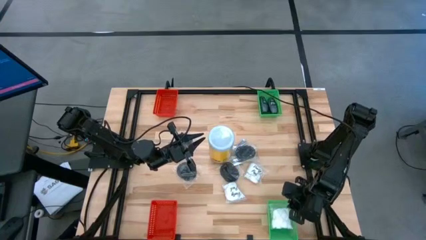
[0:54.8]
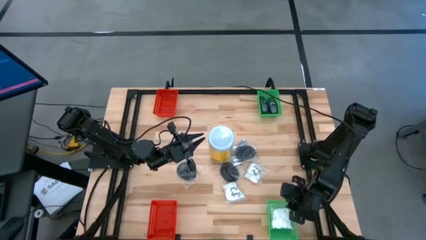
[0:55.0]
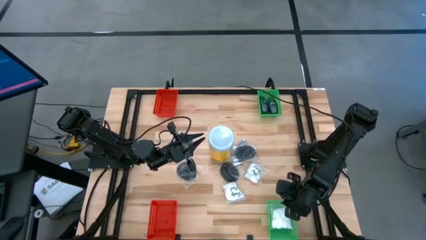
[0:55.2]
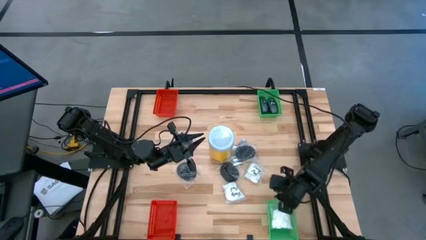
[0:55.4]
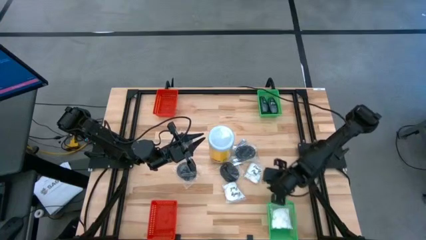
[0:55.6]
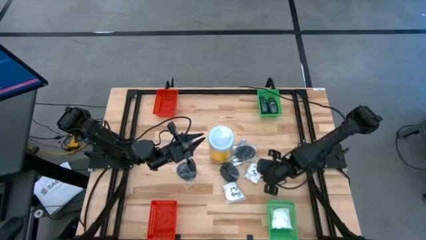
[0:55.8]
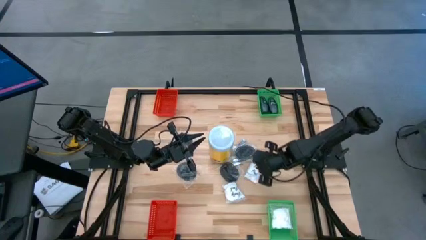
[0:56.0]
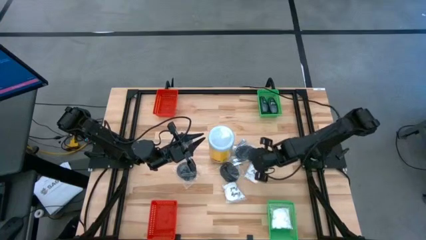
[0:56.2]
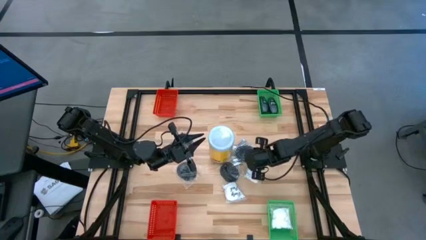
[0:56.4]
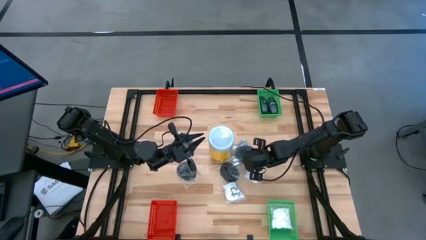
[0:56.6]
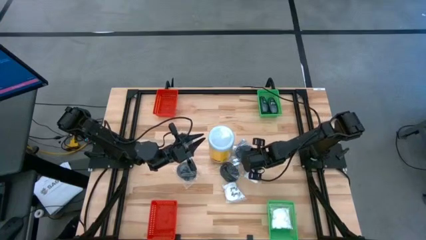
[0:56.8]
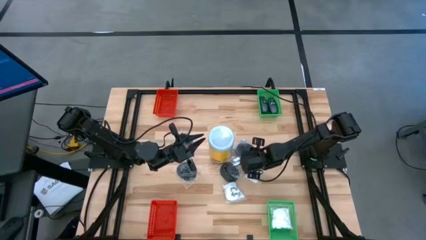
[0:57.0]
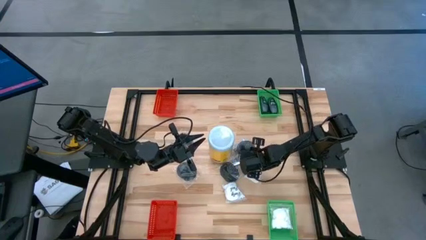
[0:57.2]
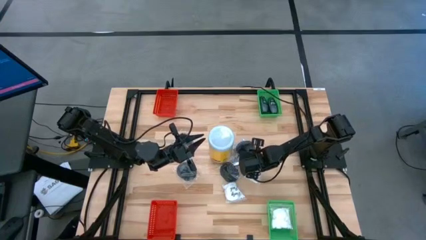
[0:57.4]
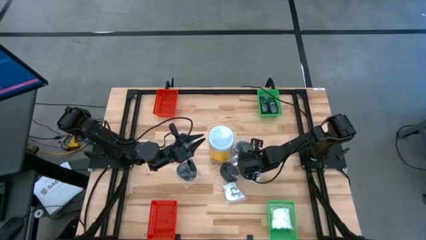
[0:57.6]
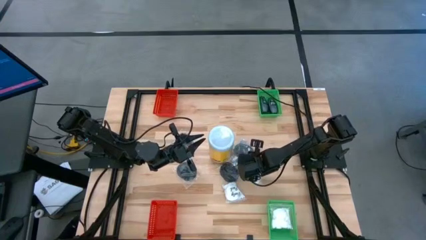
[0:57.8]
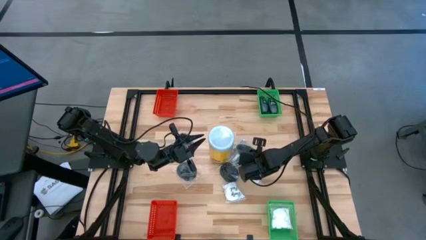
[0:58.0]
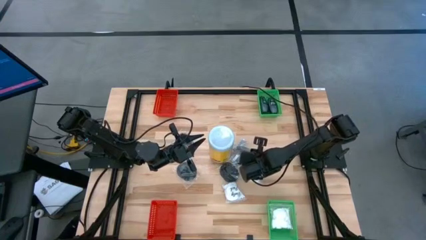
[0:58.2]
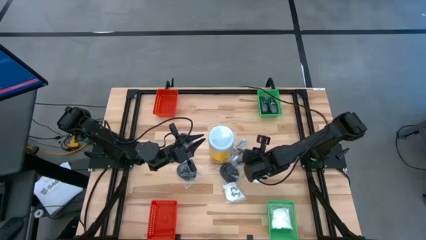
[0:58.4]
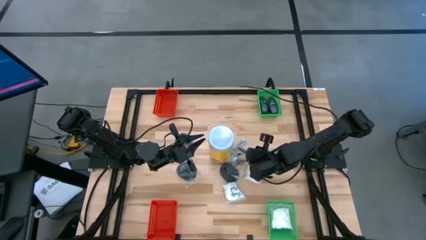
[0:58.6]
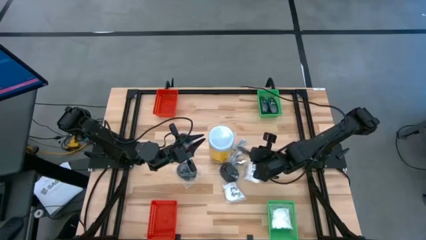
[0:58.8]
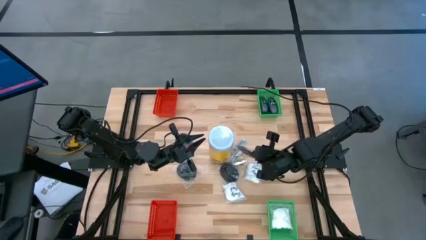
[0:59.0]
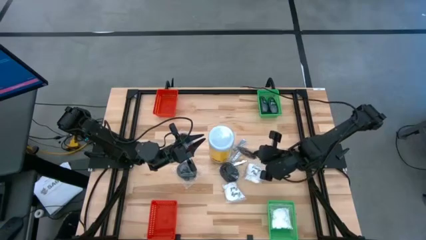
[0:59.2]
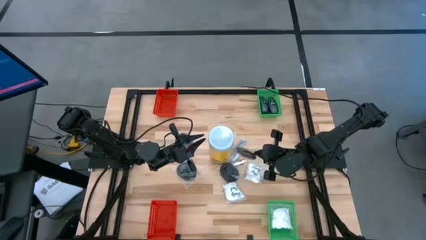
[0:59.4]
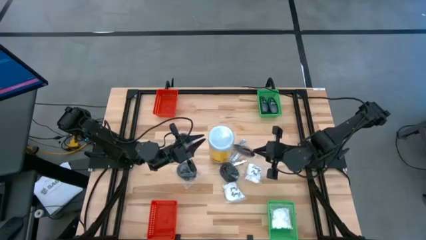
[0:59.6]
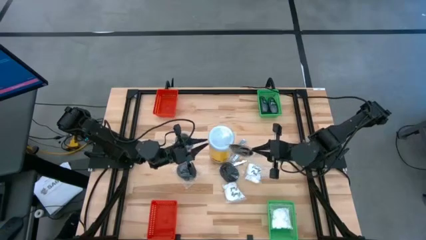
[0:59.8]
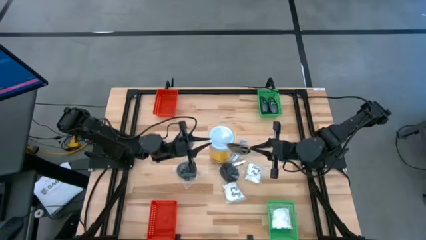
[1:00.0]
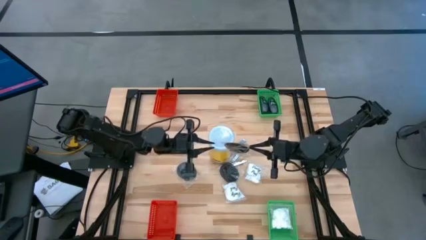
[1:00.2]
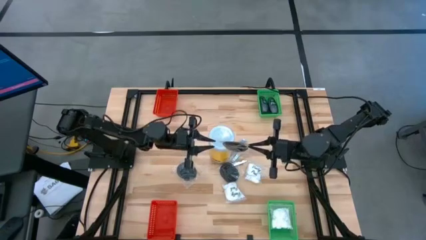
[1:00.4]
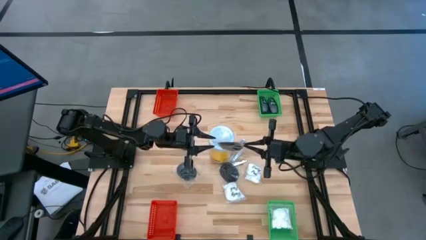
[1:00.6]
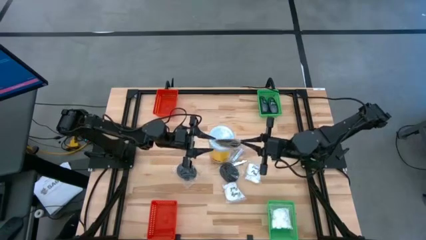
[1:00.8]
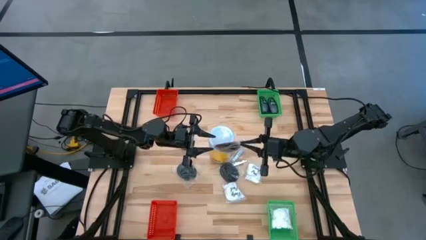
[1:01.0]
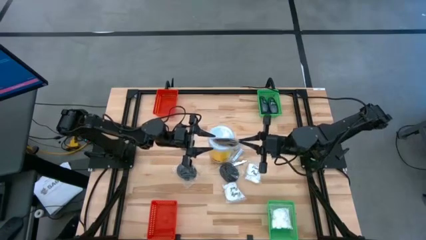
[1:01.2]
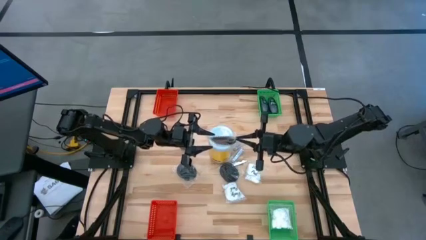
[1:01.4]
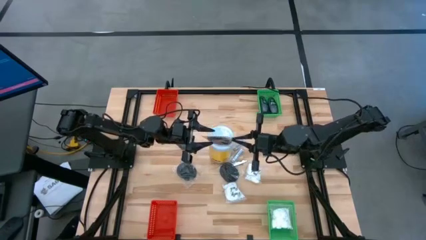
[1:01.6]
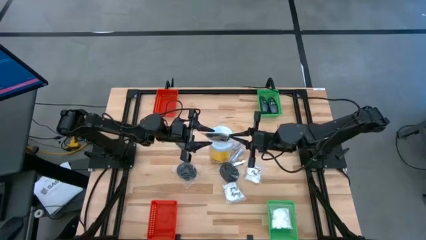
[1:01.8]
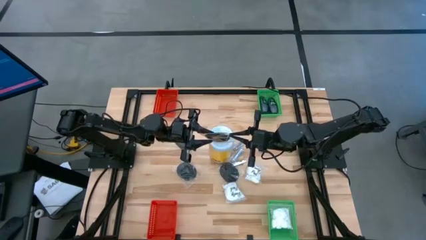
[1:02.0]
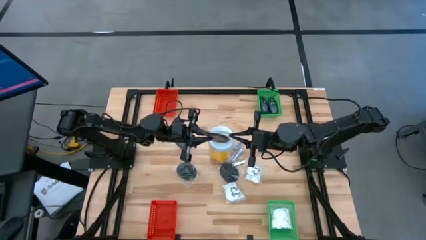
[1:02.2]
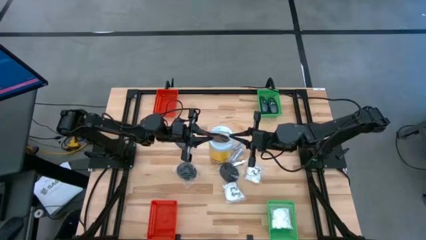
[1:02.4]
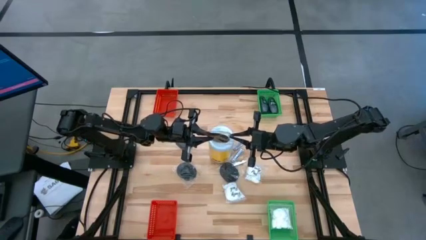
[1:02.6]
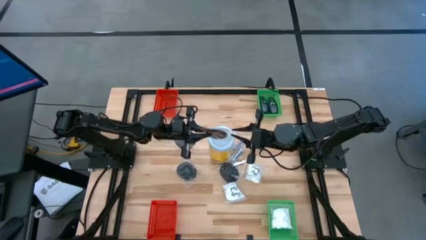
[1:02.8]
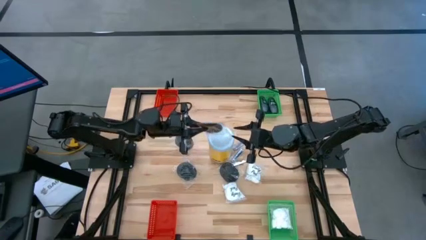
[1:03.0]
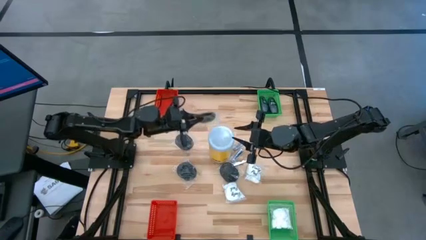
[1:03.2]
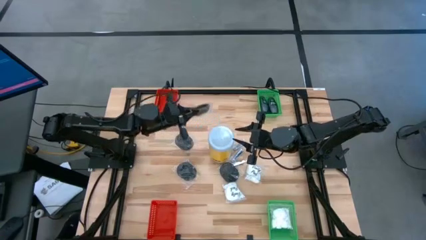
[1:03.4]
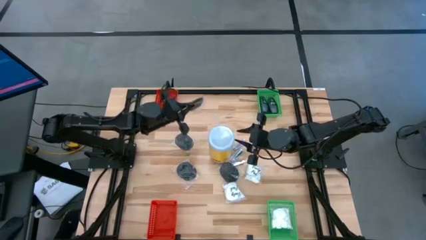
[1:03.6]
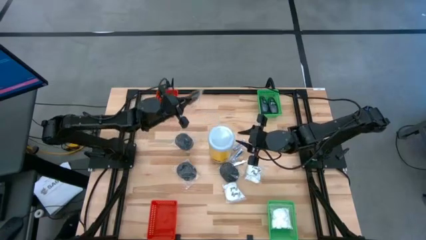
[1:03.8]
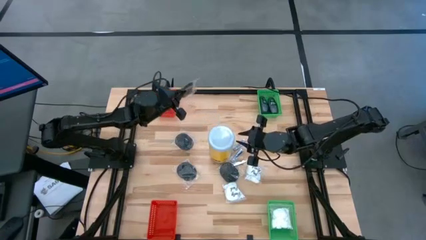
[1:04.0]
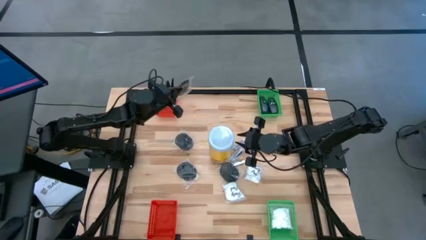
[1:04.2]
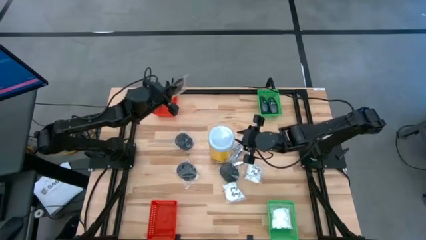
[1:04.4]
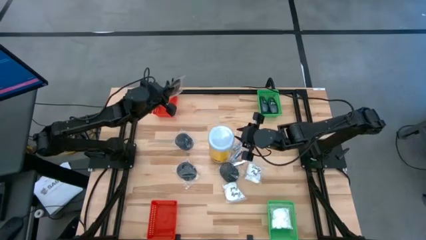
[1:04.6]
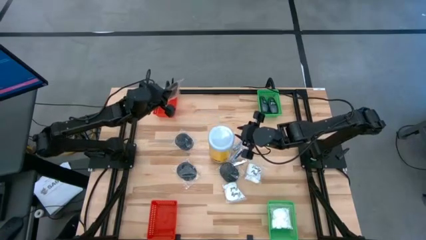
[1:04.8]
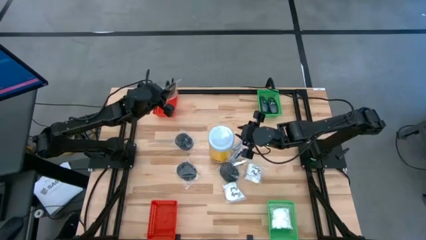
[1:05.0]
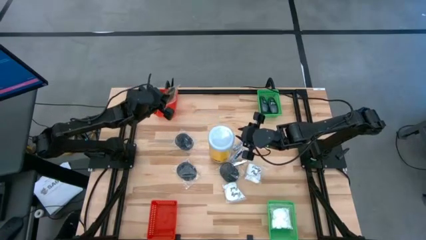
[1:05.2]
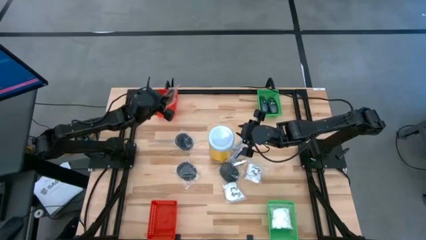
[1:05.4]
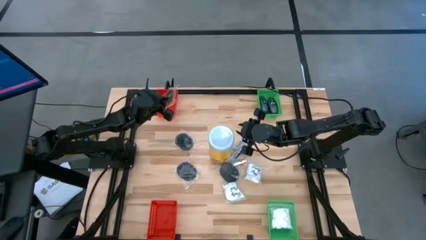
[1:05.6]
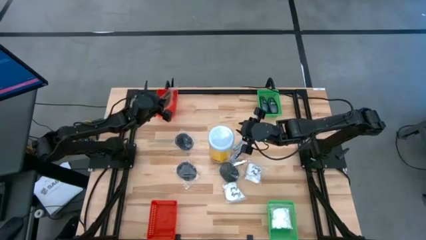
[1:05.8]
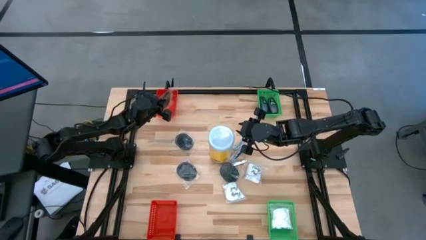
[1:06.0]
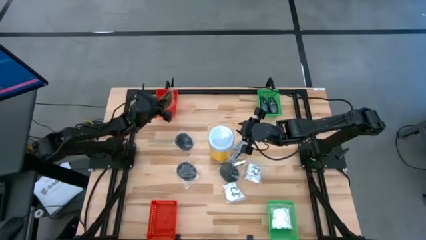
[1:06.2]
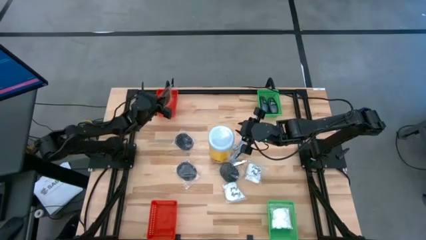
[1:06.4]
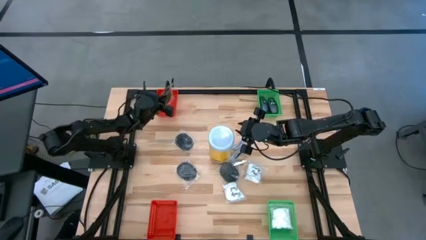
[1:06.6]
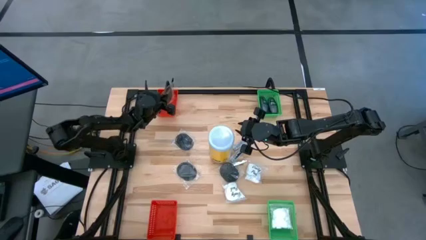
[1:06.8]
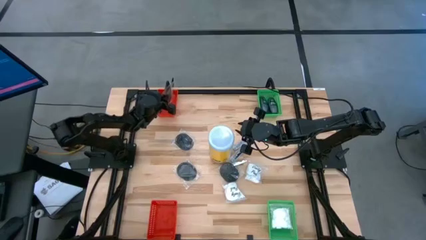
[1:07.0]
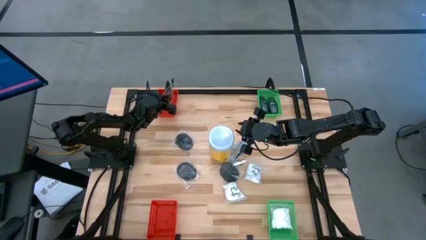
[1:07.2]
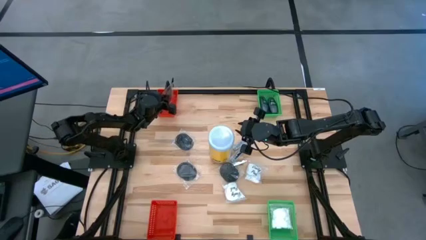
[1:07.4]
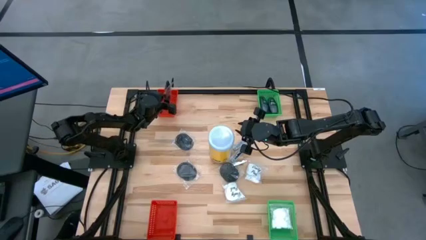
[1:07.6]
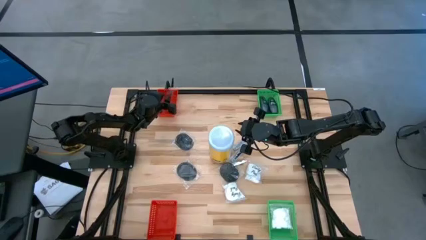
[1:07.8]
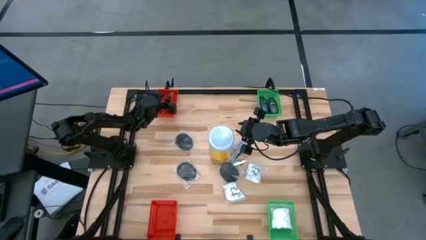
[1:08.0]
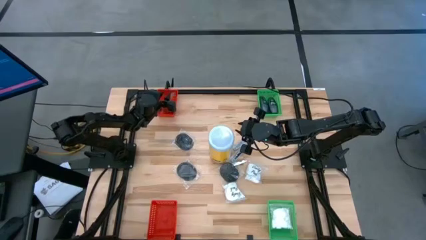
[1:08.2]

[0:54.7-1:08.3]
Task: Pick & Place Travel size toiletries
Put the black hairbrush into the top orange bin

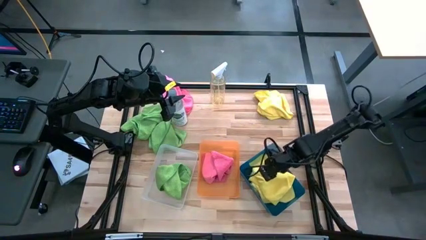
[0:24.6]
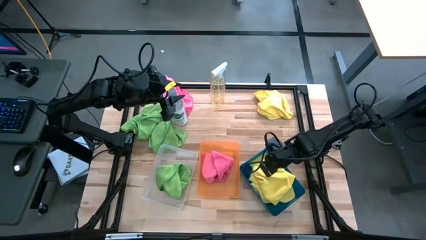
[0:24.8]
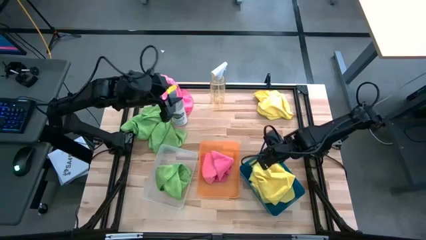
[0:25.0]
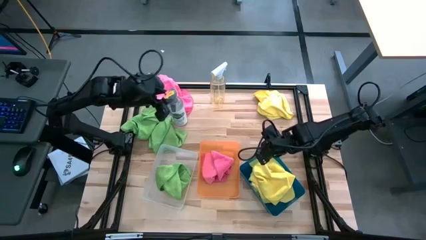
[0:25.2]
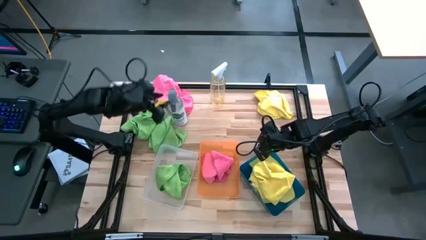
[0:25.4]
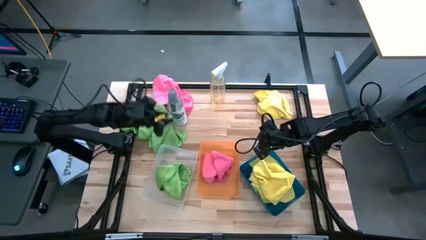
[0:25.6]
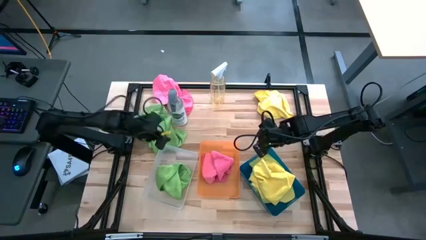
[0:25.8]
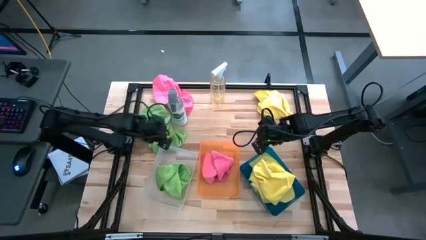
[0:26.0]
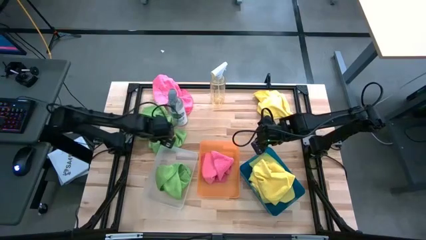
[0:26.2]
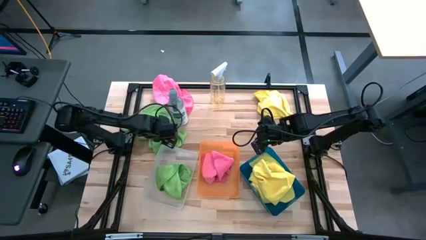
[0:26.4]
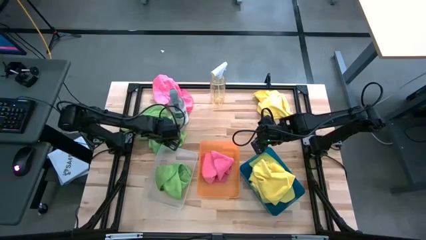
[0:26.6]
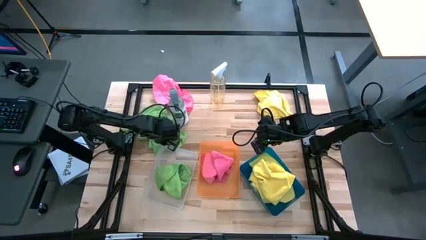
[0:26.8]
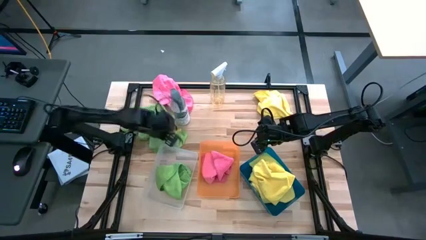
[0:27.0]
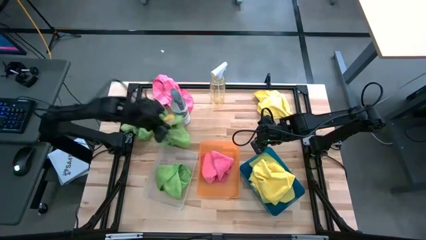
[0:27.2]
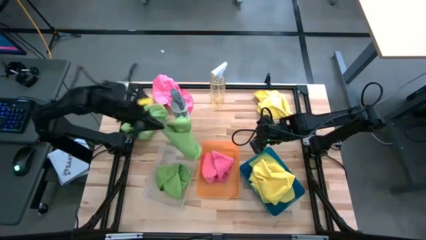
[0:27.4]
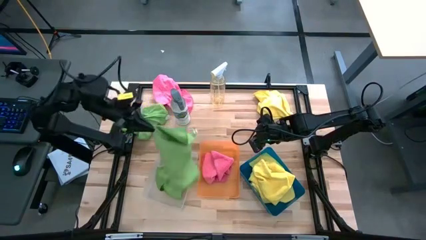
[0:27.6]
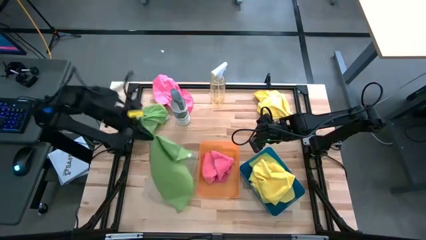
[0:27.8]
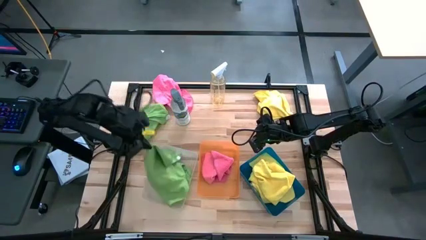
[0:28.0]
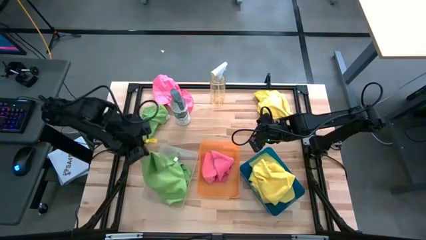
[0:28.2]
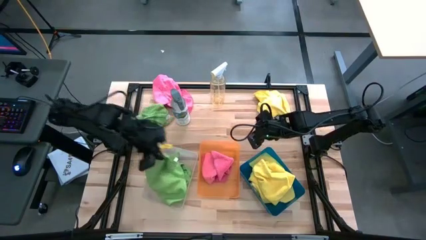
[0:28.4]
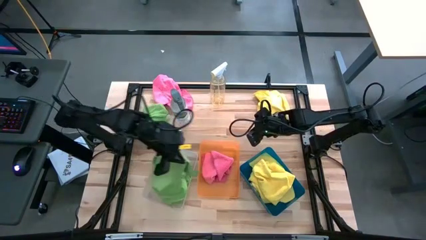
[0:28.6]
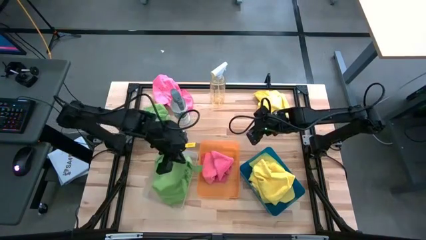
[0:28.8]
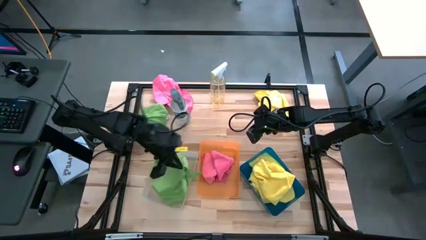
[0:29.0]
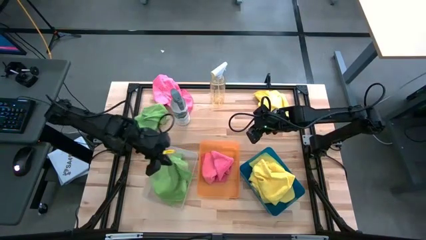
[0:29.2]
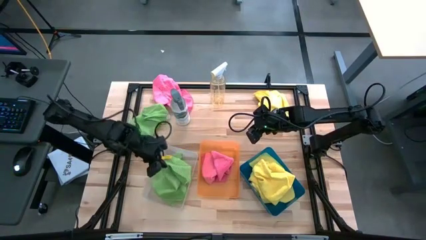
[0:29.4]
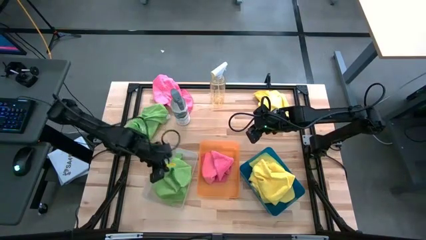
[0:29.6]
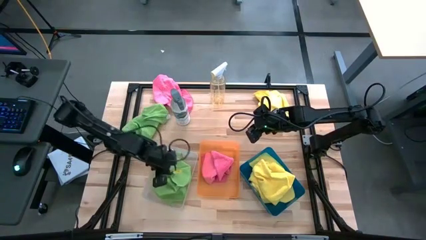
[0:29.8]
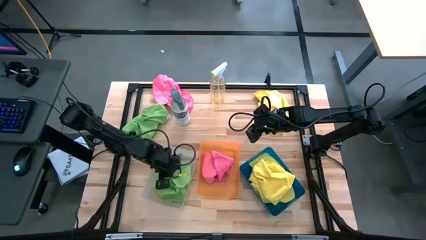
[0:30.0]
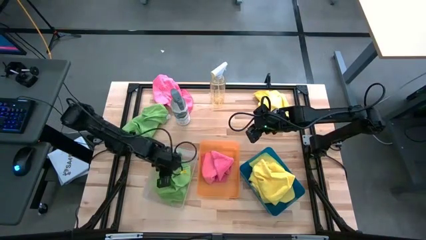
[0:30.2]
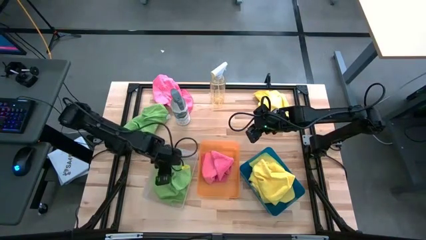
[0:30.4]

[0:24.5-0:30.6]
Task: Sort microfiber towel by color & place in baskets
Put the green towel into the white bin
